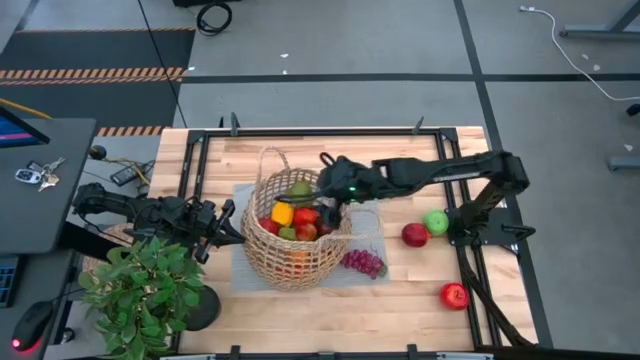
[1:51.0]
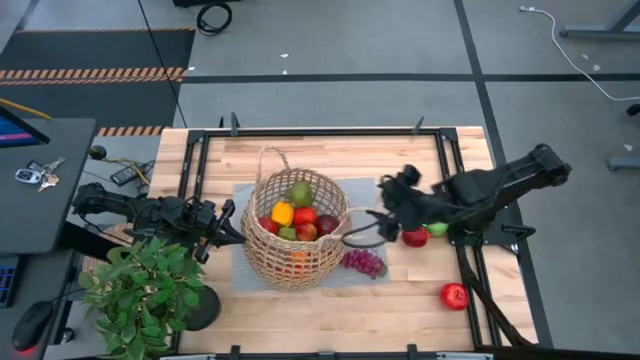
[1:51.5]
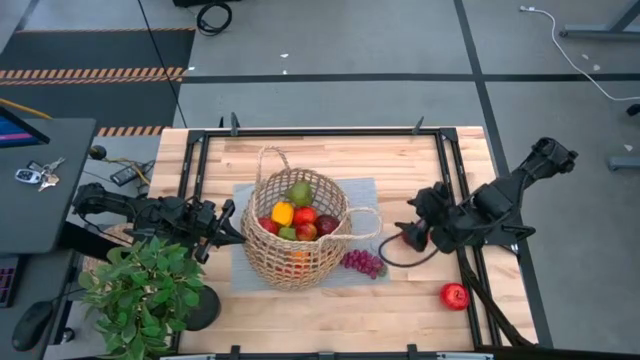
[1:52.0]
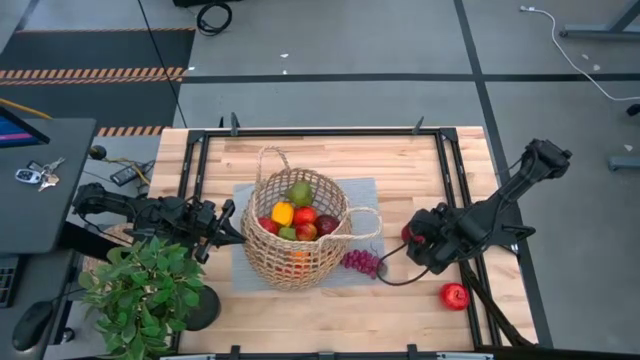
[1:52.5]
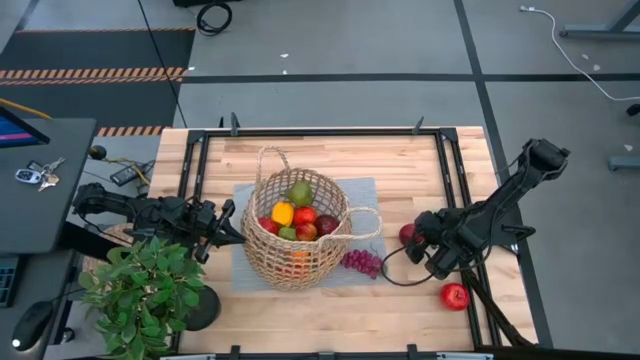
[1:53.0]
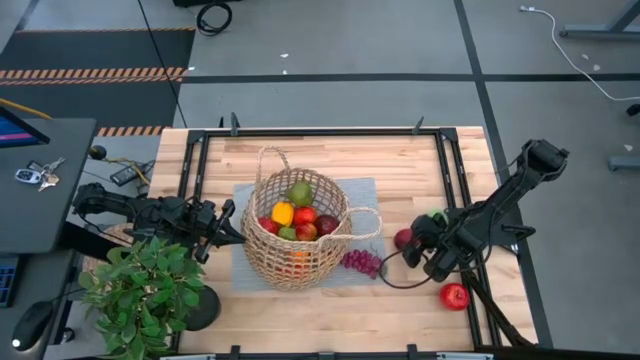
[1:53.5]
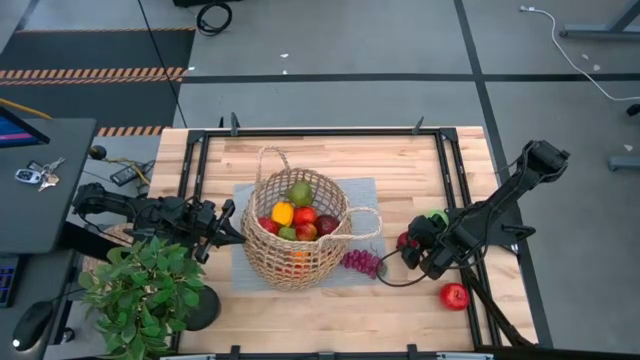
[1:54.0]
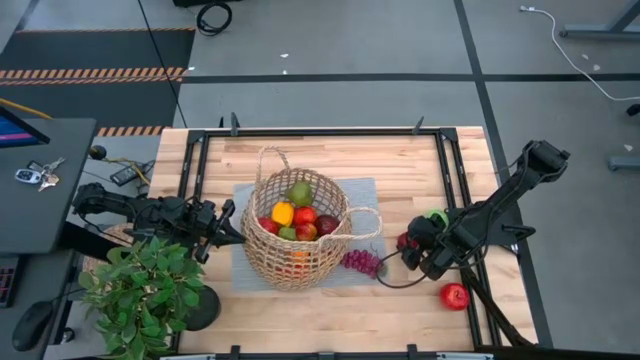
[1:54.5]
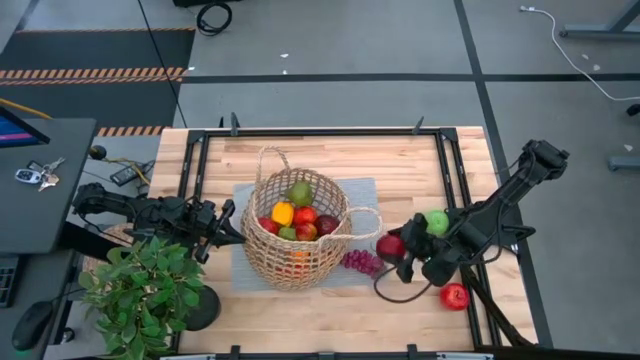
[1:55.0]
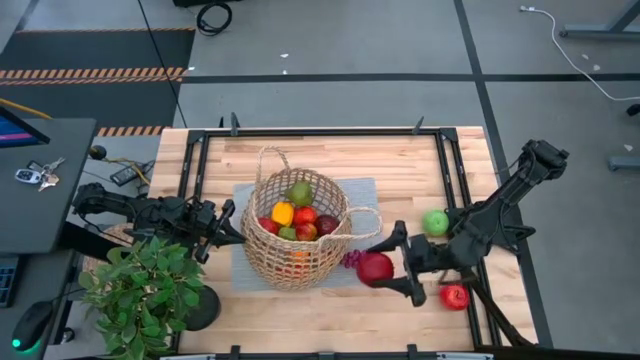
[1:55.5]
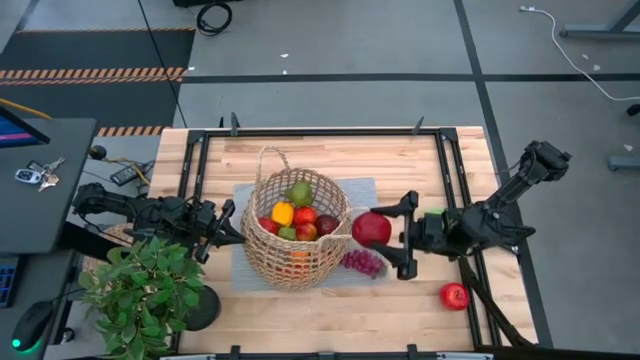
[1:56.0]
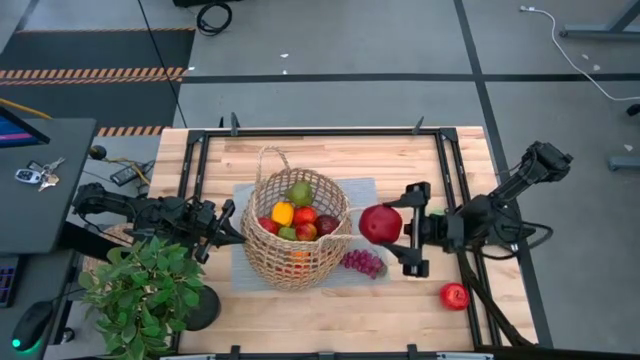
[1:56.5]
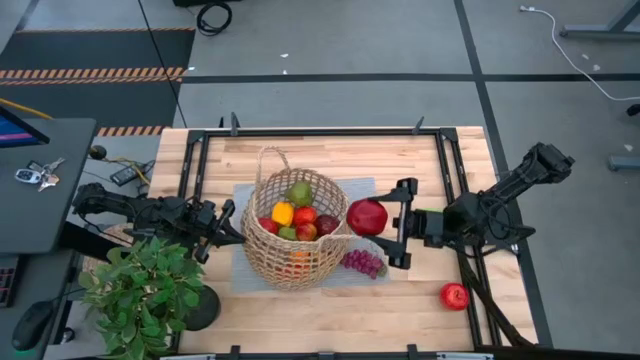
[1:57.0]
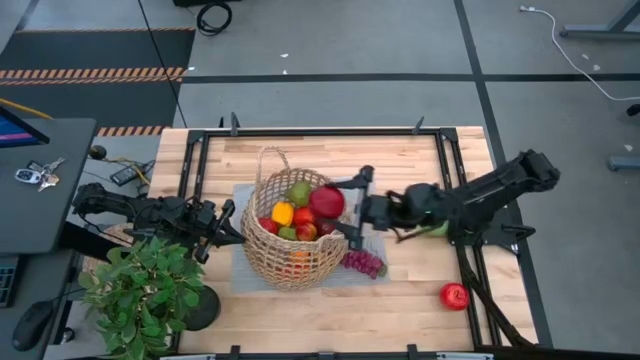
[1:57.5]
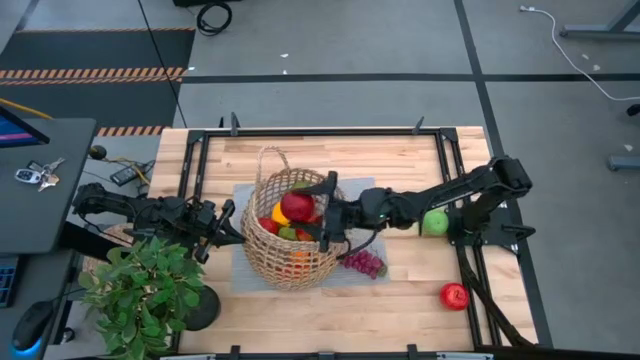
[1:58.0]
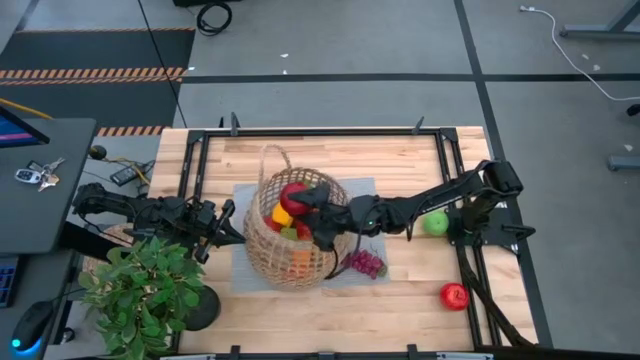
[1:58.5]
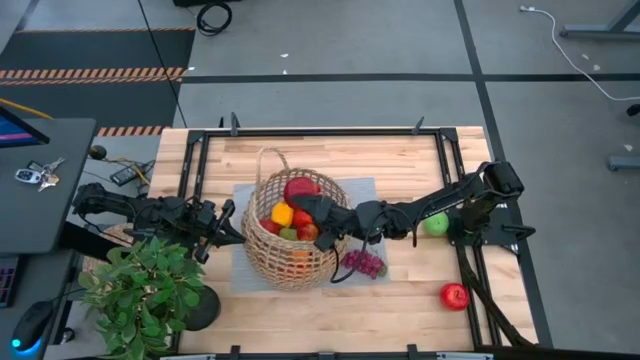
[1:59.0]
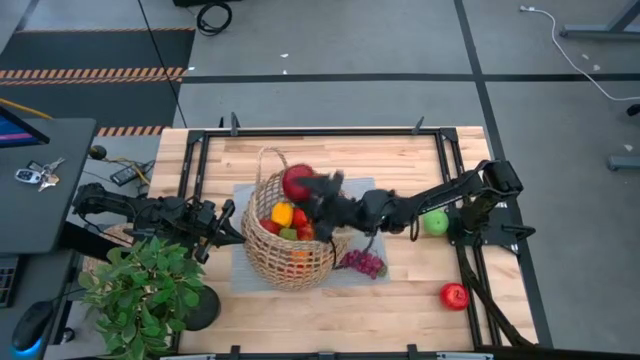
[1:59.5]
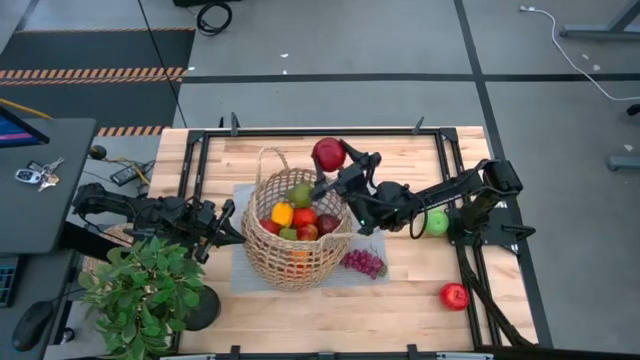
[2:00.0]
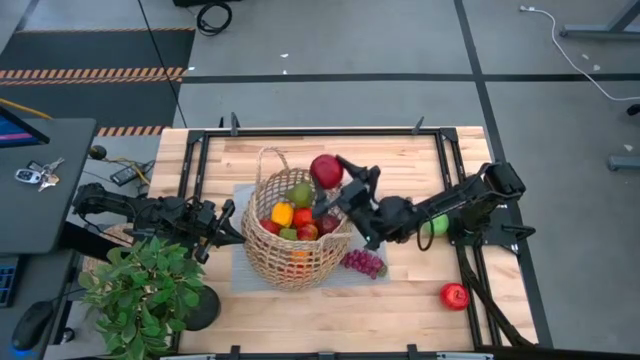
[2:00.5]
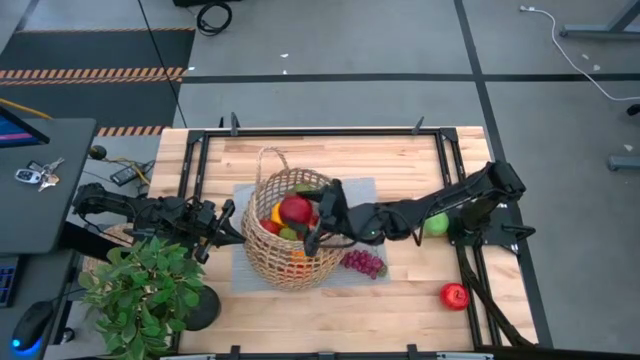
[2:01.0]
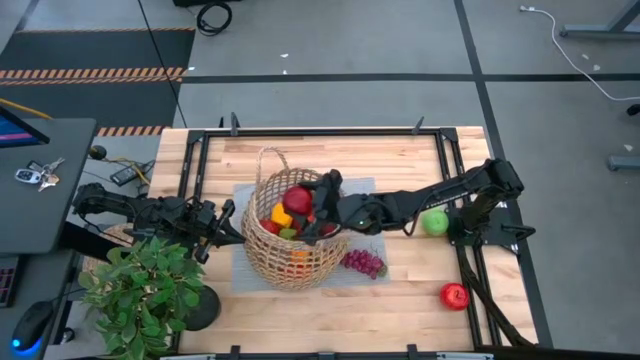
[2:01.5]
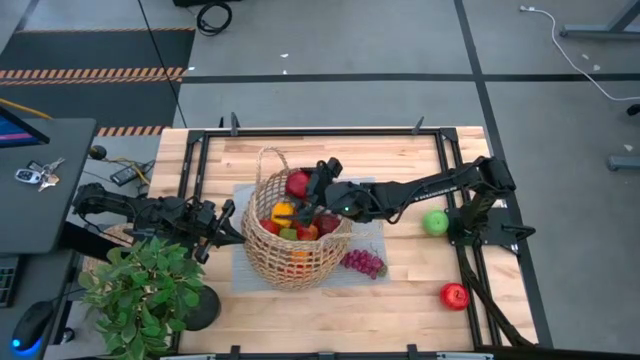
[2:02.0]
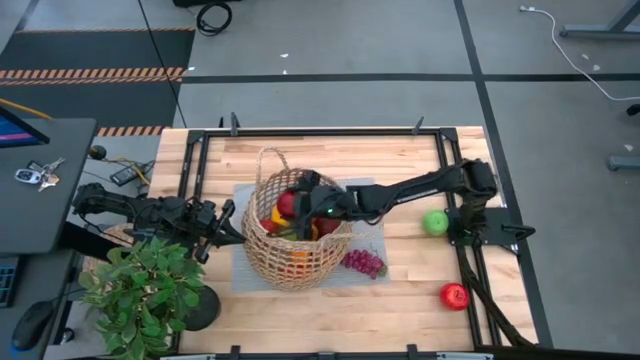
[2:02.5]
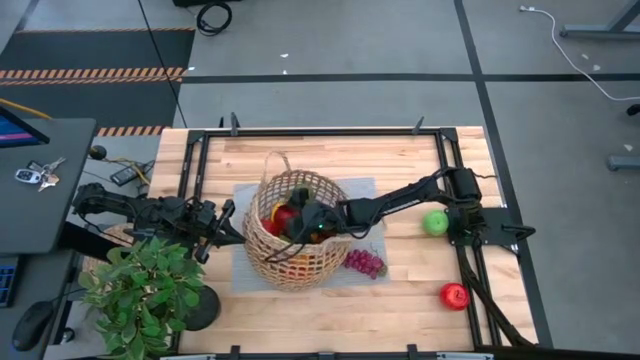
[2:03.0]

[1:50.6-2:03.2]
Task: Build produce basket
Put the red pomegranate into the basket

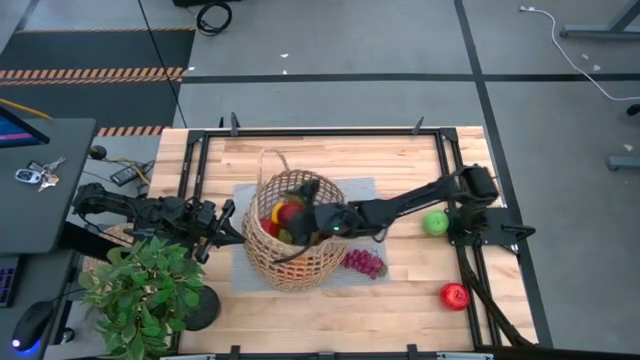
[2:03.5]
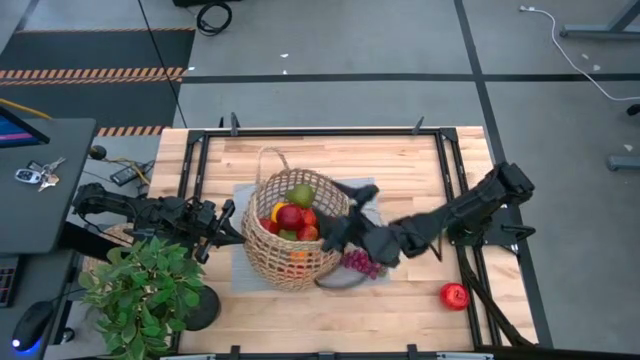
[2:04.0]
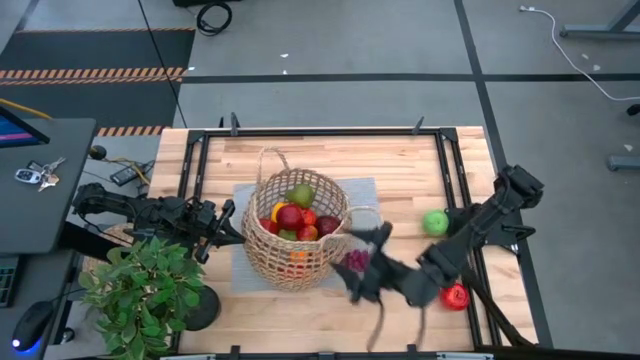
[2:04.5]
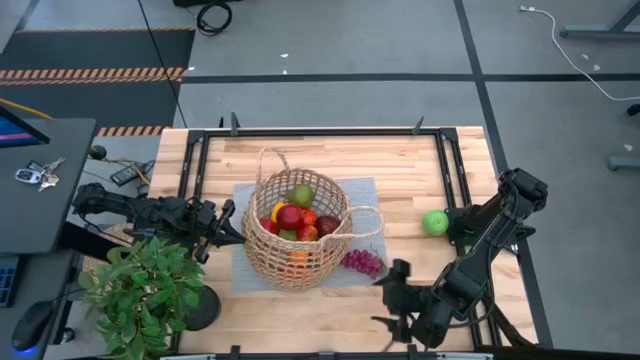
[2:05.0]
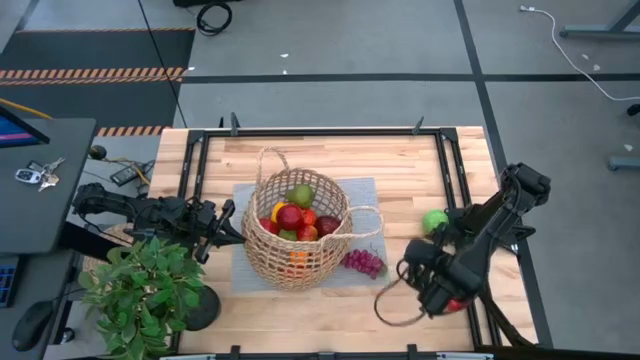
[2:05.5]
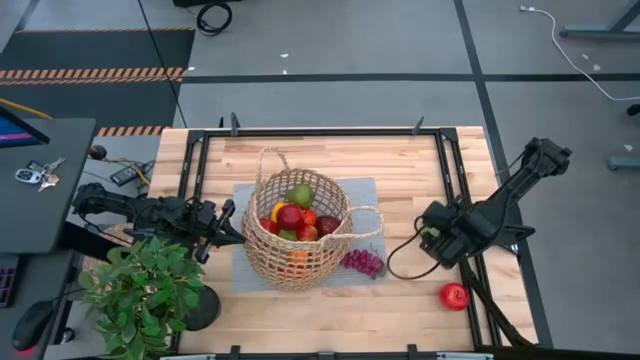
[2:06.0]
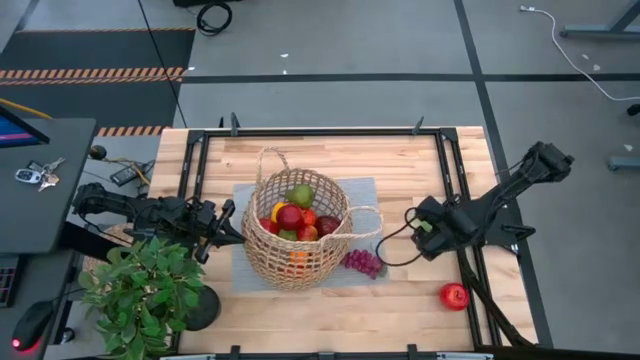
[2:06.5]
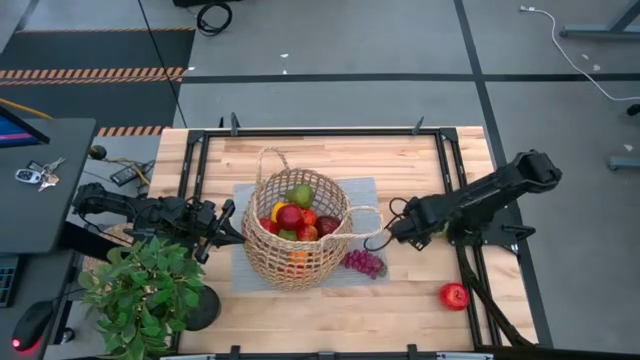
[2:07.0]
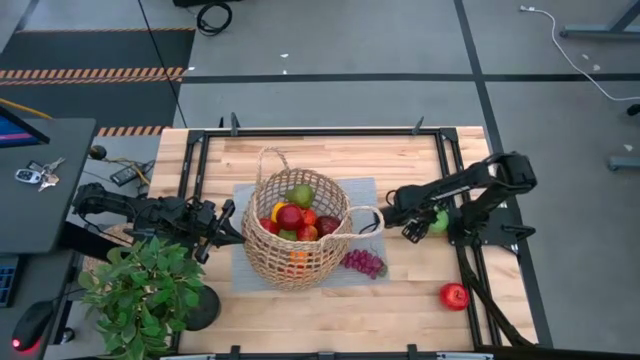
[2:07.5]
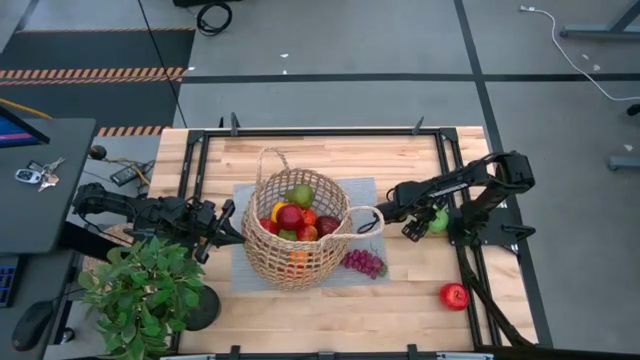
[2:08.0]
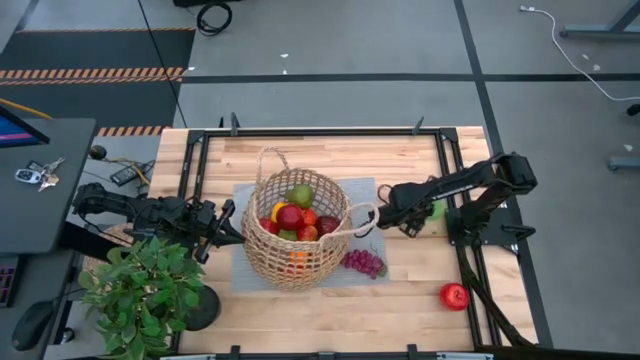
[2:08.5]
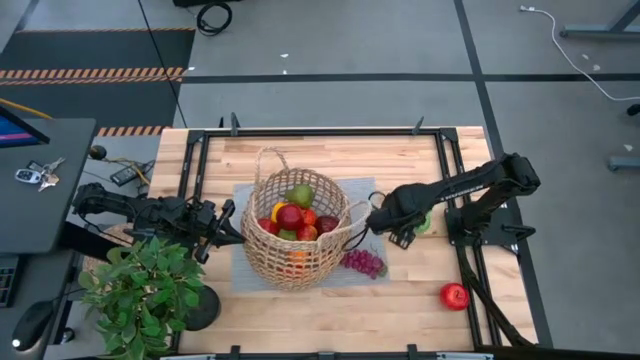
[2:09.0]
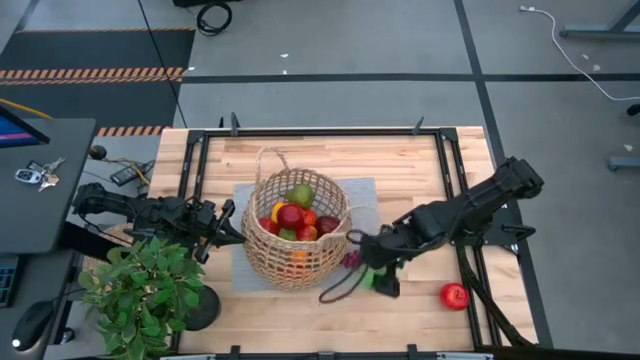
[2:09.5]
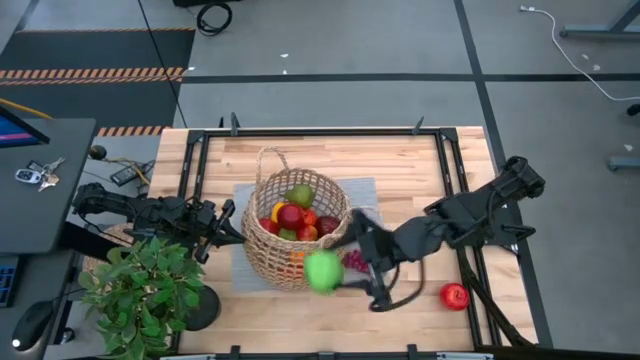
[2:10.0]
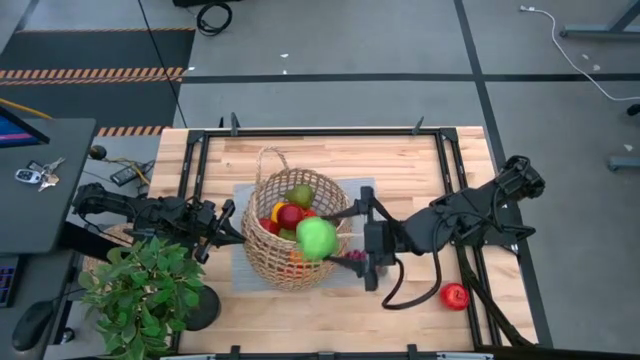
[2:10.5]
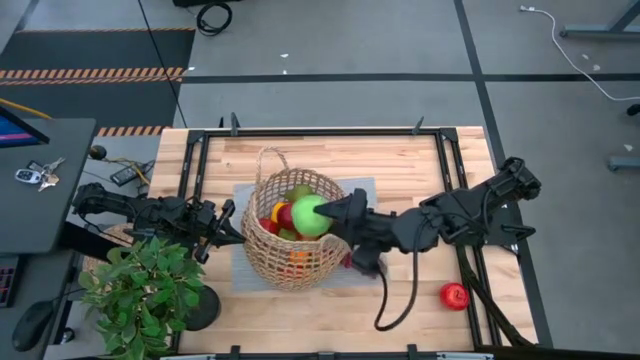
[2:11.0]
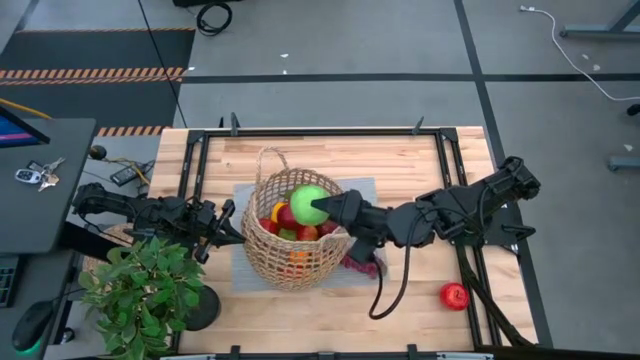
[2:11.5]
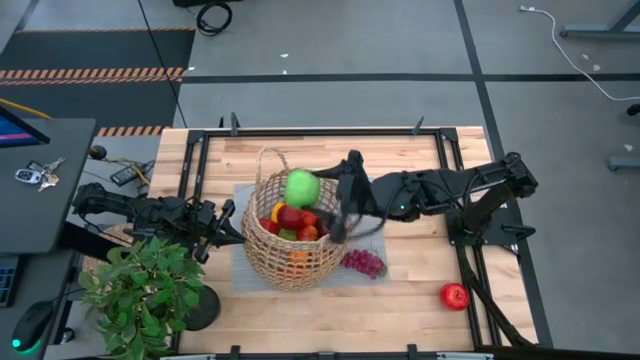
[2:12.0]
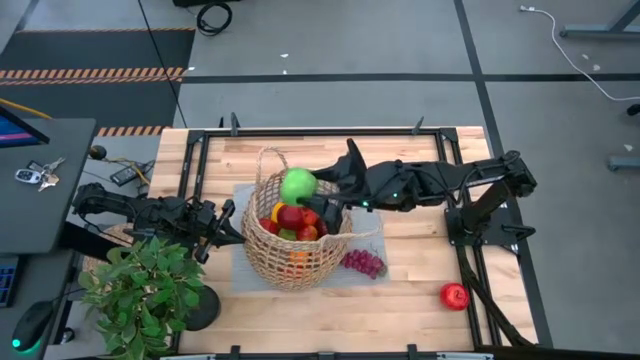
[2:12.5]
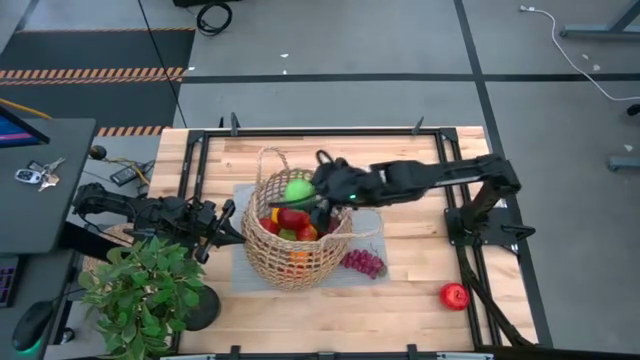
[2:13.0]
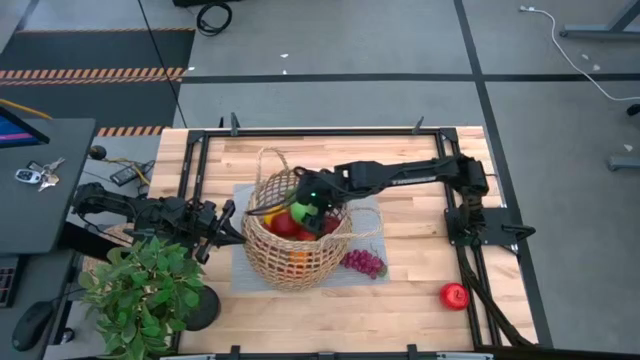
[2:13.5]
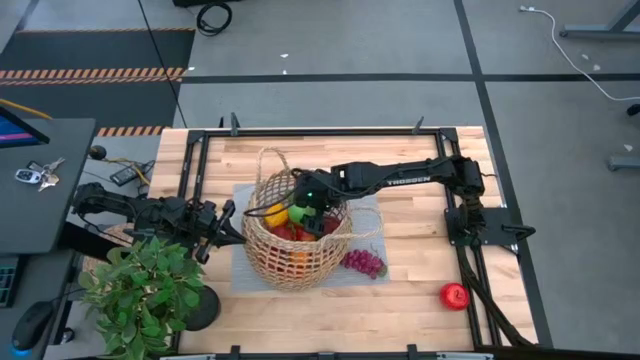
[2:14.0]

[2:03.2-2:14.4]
Put the green apple into the basket
